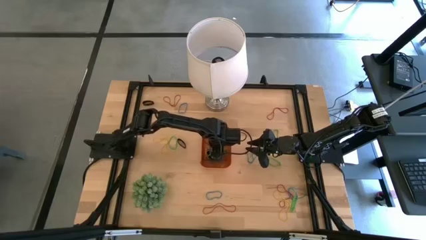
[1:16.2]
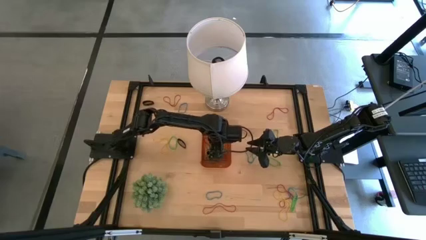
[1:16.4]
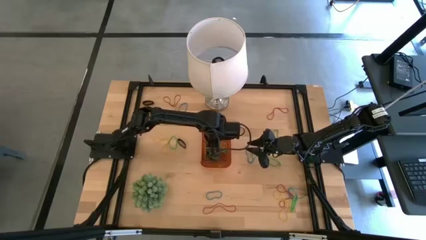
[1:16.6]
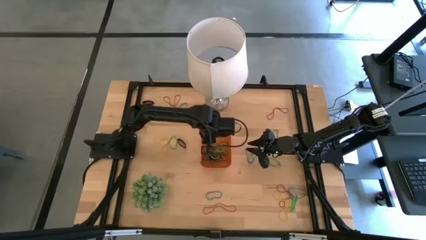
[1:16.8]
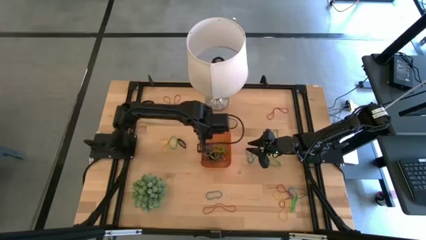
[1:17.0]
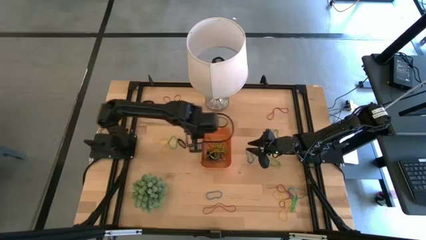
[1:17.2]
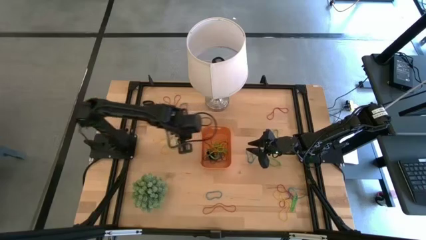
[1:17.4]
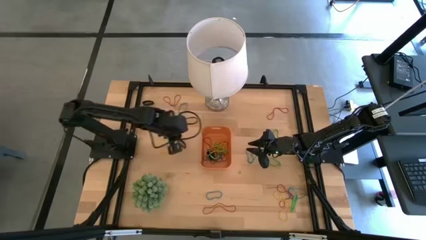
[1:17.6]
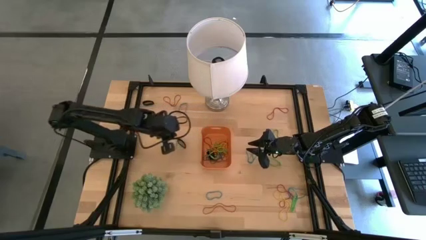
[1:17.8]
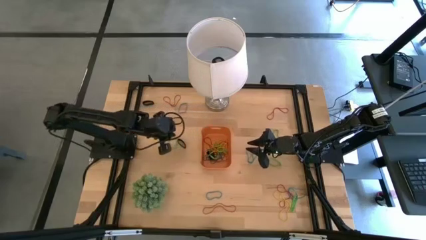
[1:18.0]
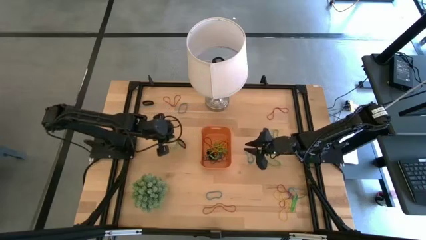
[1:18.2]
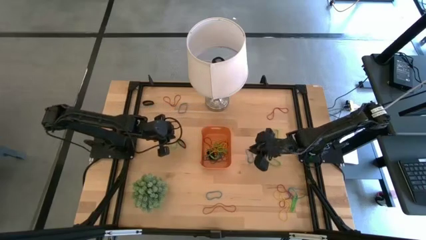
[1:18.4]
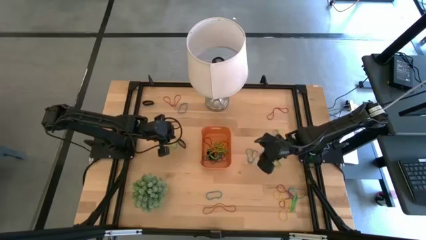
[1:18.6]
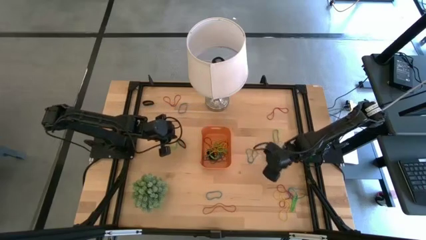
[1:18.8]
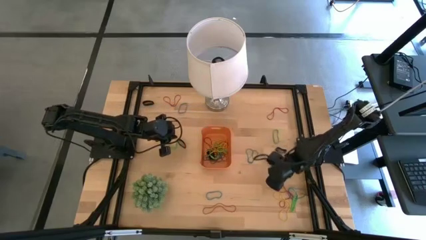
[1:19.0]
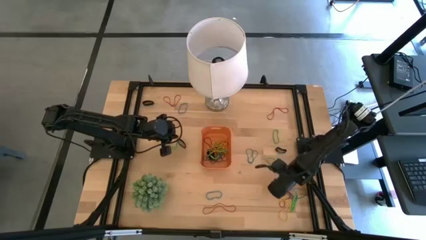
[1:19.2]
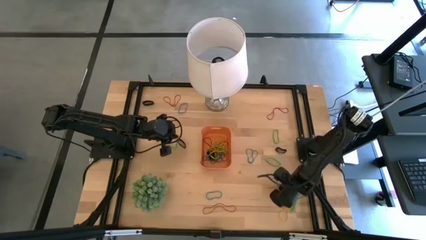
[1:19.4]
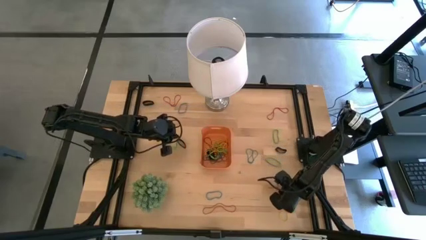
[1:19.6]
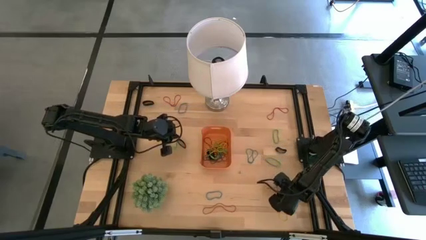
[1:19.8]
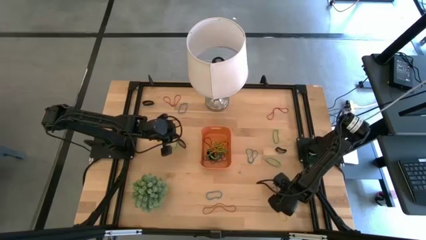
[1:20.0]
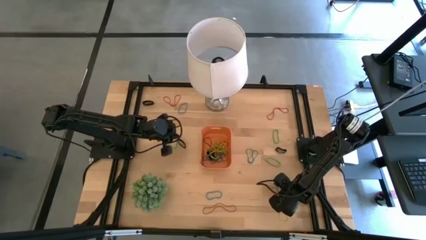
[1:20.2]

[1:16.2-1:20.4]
Task: Pick and place rubber bands into bin
Put the red rubber band into the orange bin

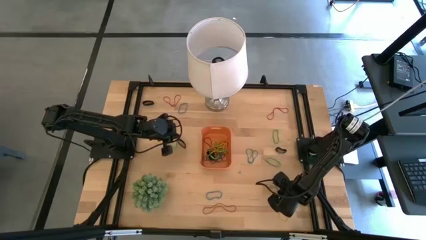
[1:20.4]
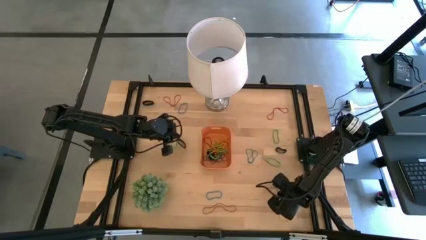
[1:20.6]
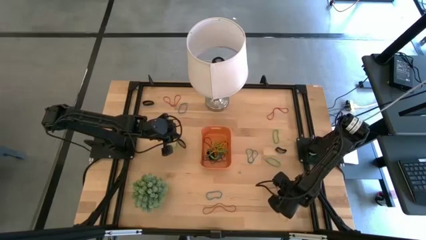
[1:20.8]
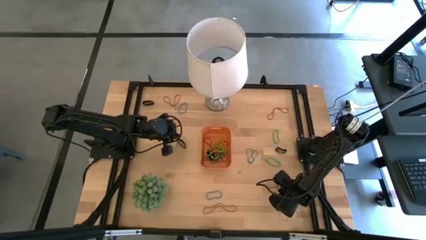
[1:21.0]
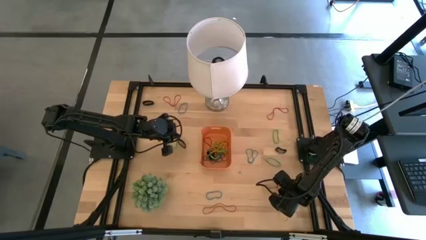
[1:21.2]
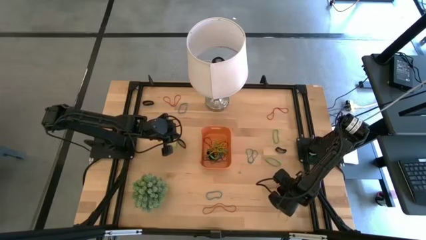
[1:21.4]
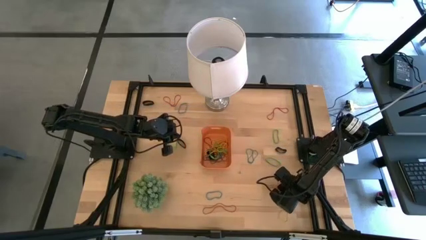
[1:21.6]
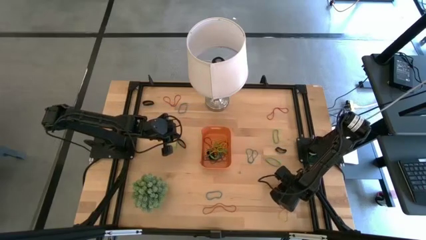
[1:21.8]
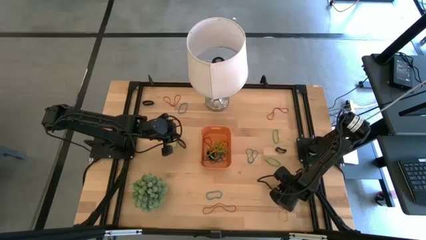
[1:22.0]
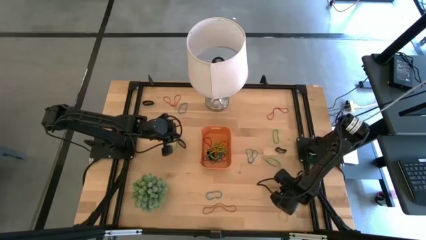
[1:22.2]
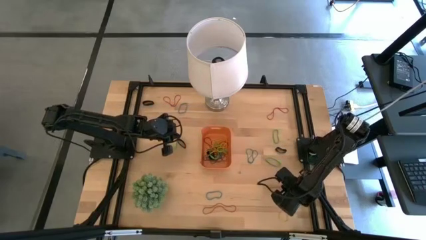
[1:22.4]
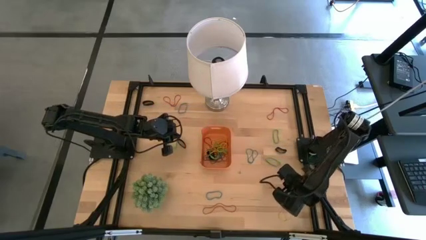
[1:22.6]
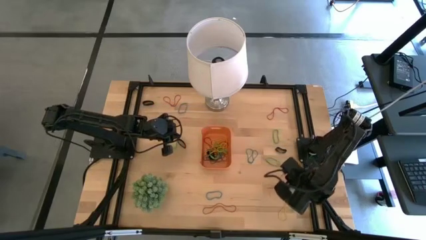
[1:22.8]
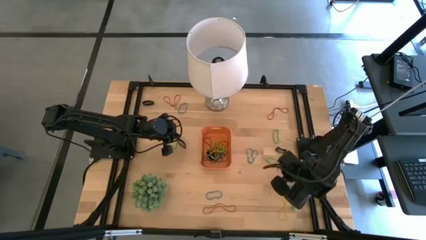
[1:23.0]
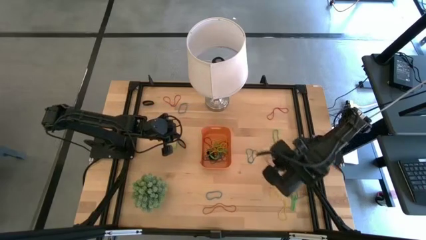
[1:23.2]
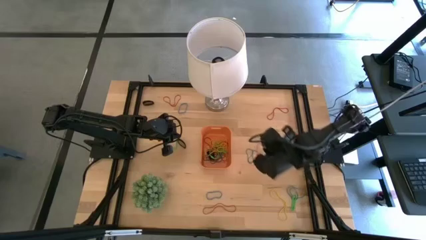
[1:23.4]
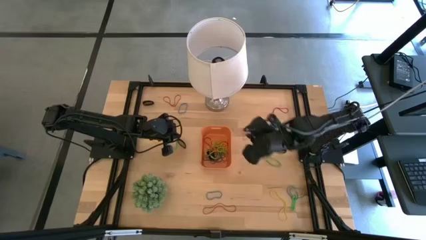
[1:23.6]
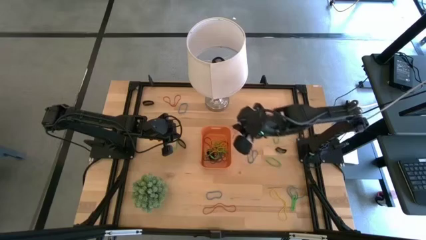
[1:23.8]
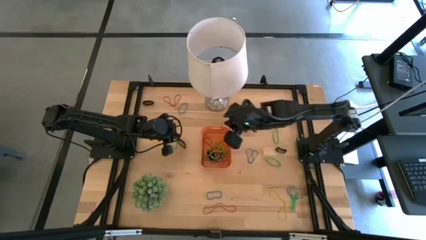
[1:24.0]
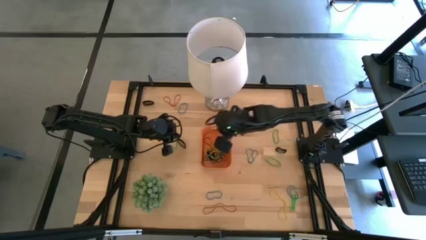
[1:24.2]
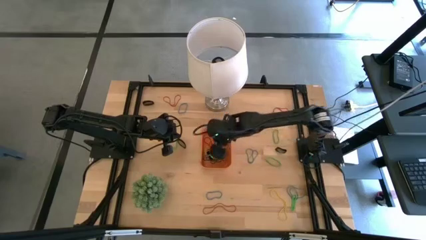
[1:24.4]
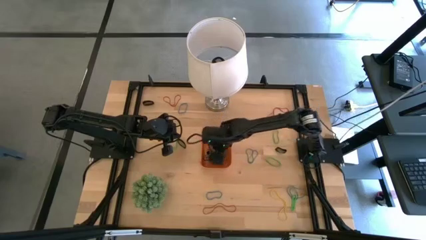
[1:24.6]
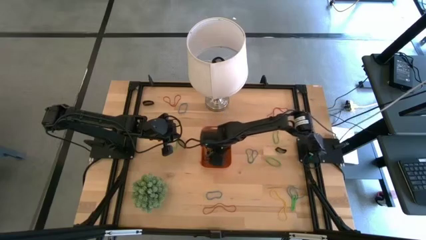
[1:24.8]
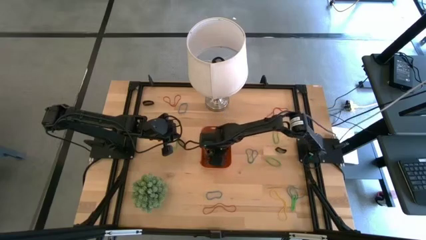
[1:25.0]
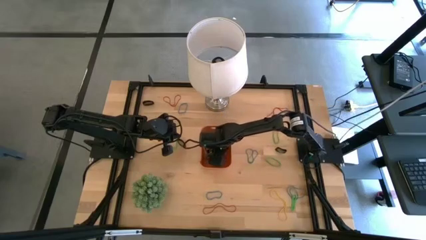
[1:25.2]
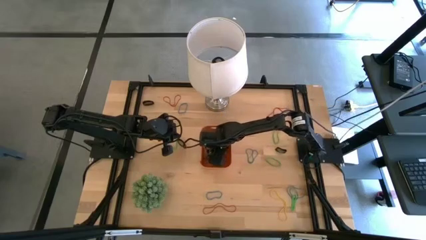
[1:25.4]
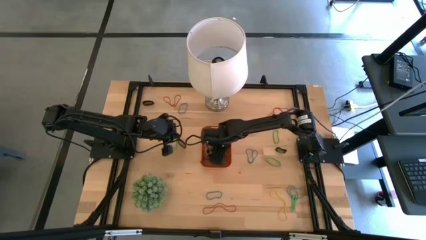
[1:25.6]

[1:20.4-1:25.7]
Put the red rubber band into the orange bin

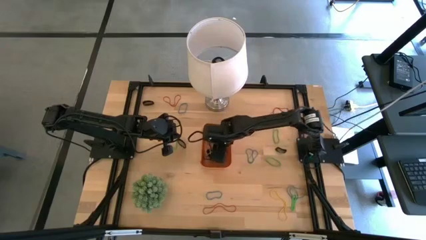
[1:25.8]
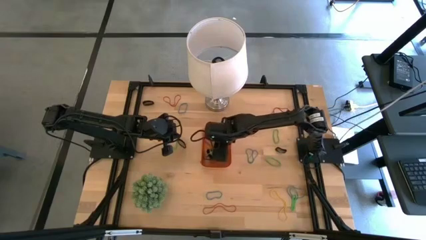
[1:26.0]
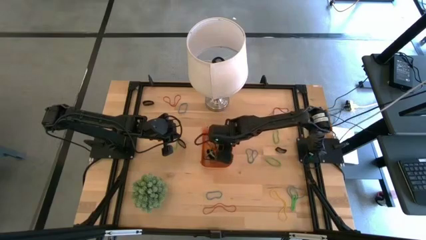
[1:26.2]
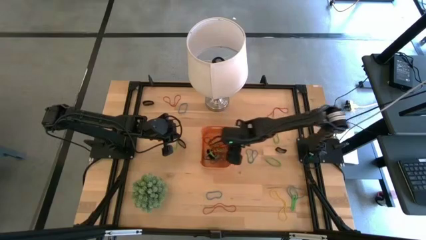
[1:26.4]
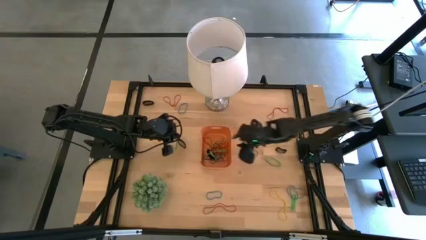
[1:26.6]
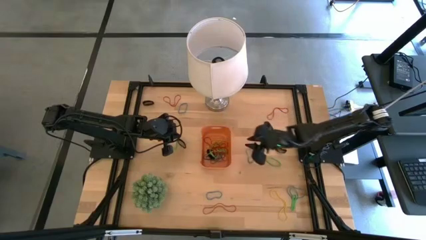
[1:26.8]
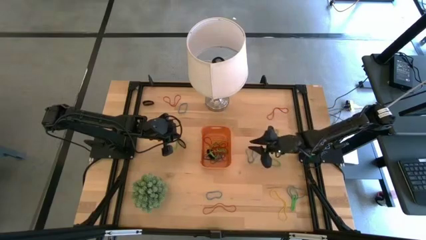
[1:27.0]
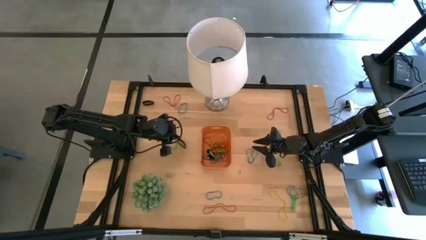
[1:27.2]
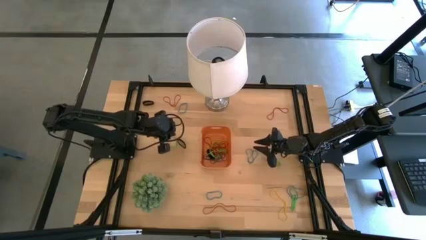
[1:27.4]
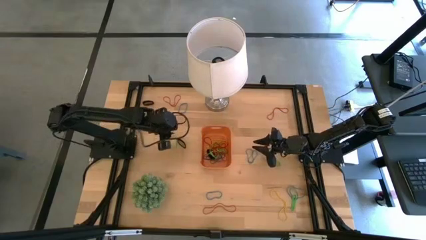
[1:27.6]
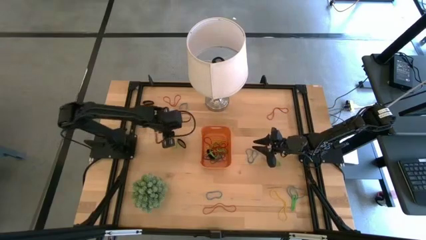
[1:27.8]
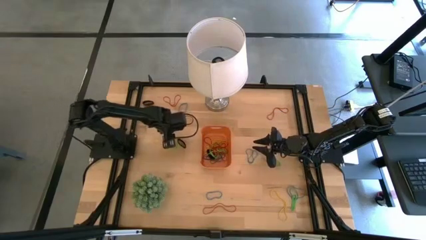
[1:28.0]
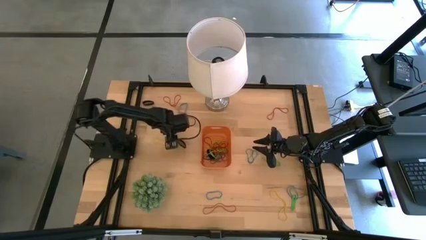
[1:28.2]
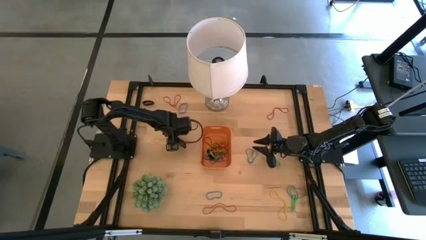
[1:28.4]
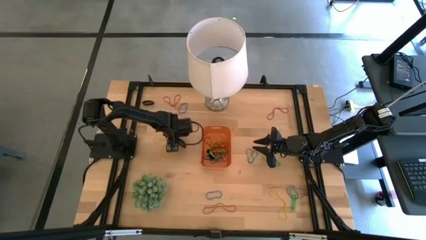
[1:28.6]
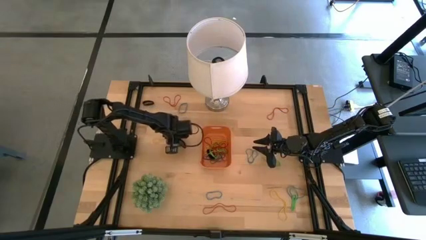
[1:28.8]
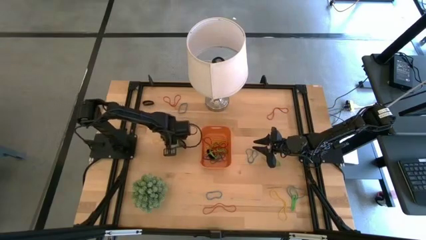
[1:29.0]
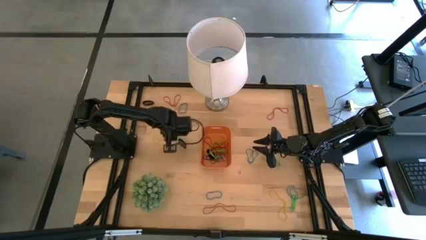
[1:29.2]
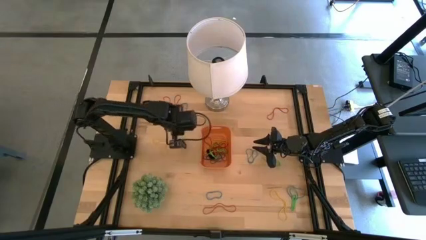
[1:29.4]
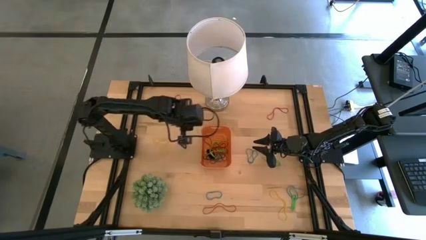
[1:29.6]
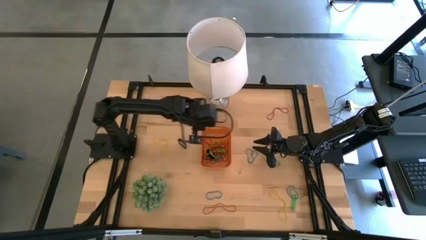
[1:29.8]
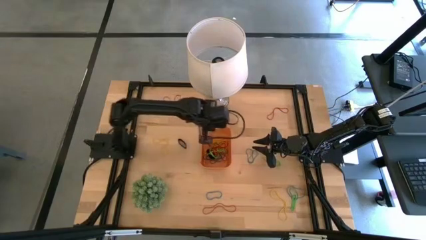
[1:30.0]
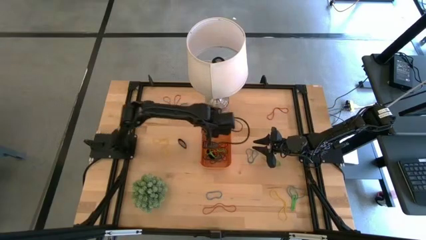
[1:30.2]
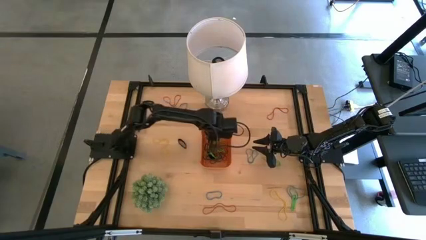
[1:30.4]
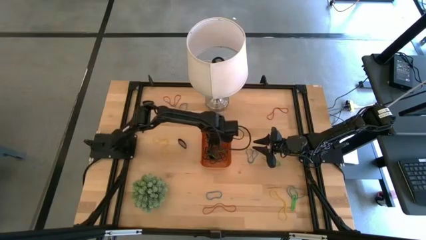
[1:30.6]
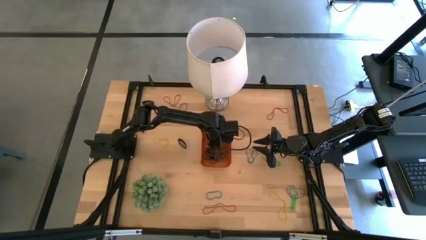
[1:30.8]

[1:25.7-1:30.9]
Put the green rubber band into the orange bin

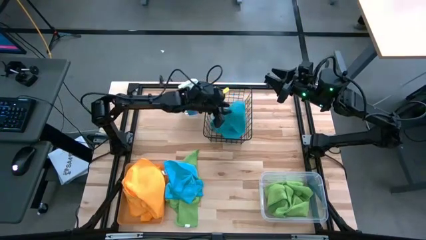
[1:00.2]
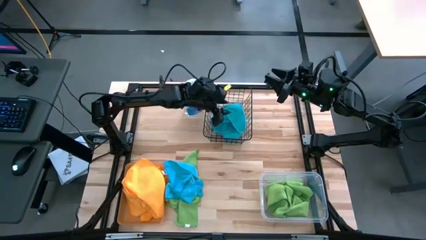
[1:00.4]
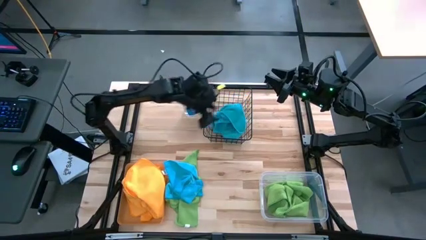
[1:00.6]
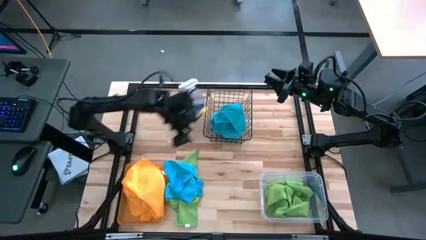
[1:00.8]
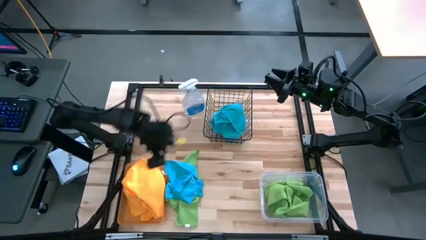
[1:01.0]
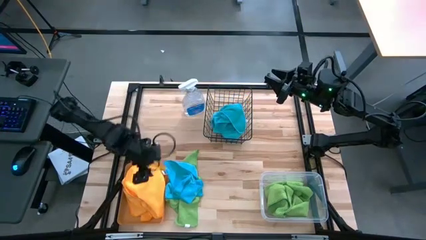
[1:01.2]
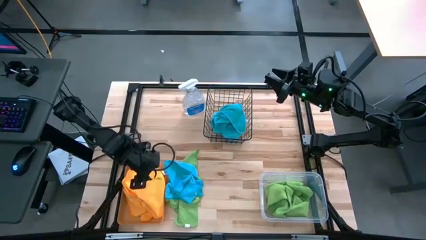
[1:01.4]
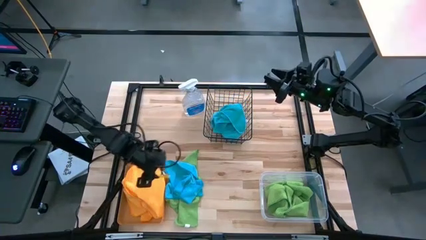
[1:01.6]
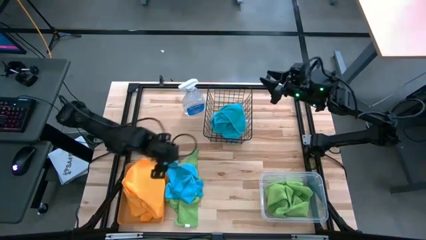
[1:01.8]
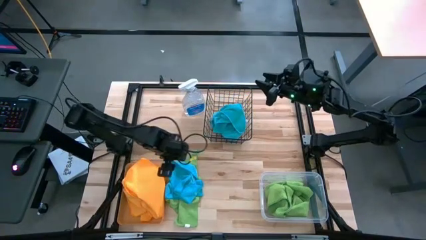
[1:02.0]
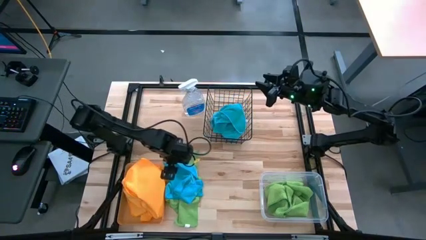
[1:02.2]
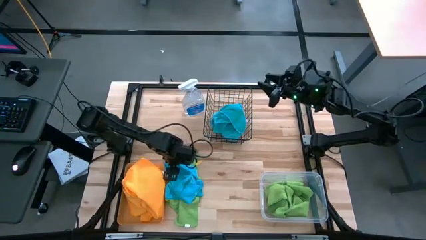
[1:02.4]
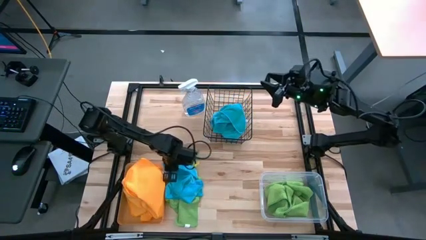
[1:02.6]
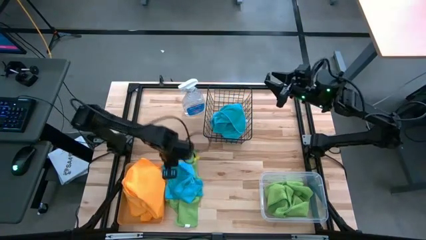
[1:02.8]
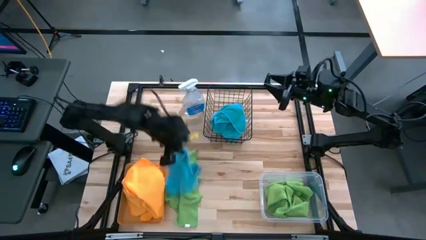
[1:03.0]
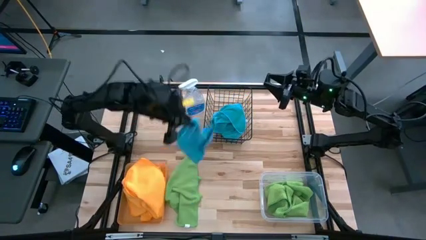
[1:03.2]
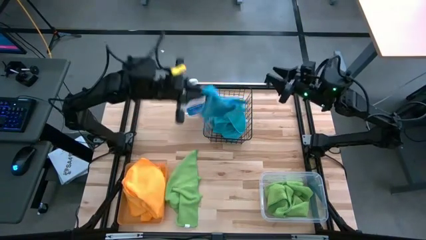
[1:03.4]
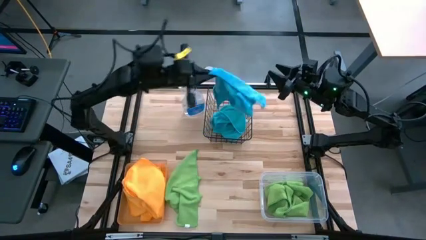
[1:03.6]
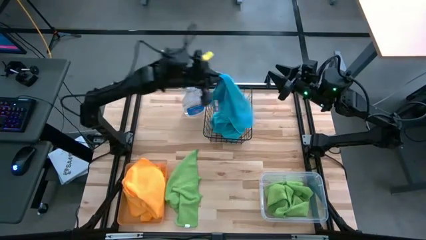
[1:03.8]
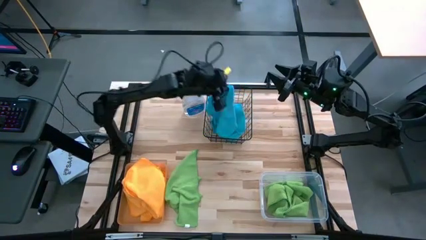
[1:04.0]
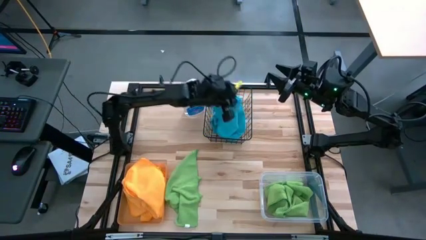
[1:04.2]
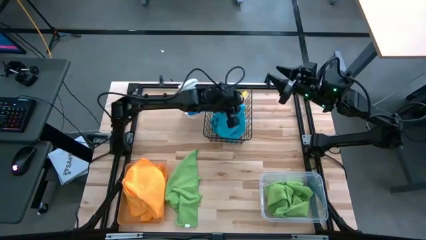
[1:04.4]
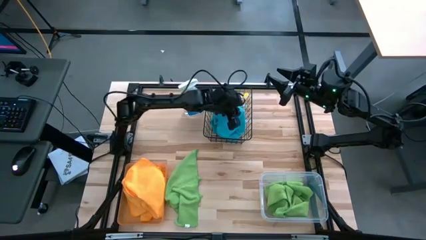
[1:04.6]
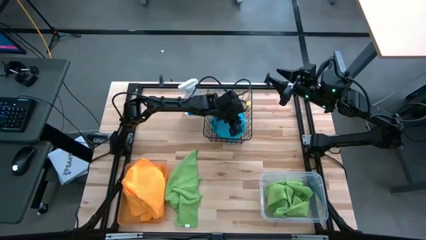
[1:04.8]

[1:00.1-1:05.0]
Task: Sort microfiber towel by color & place in baskets
Put the blue towel into the wire basket
